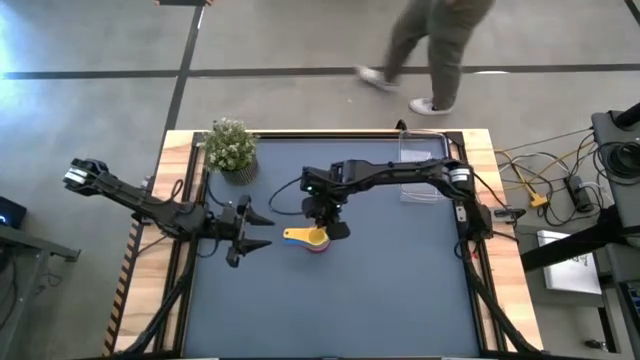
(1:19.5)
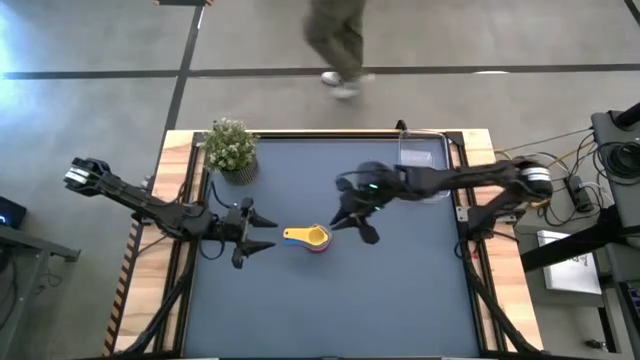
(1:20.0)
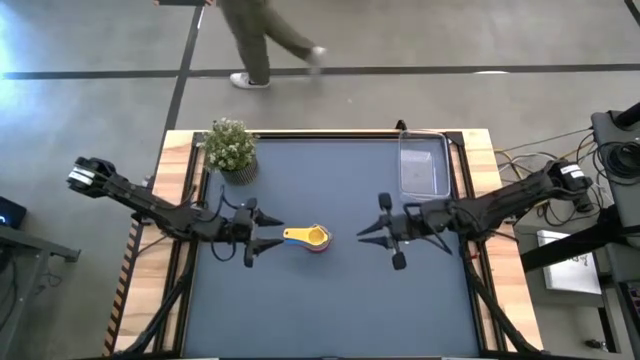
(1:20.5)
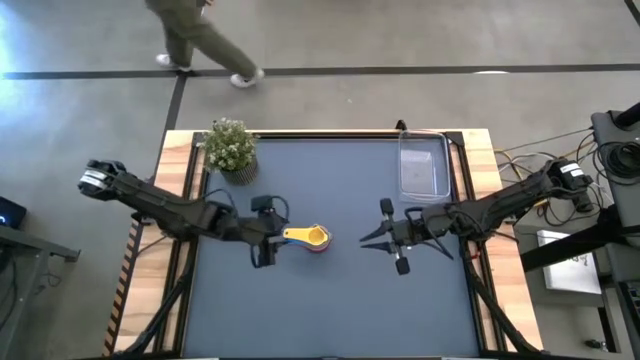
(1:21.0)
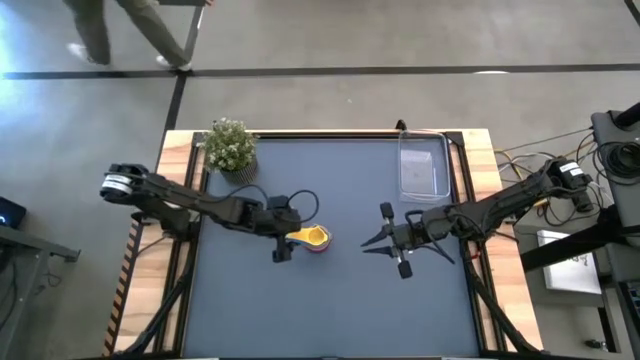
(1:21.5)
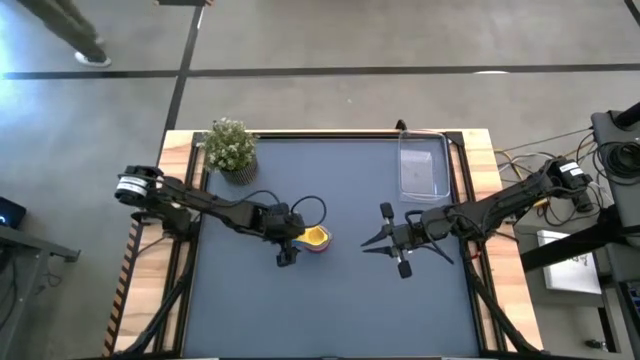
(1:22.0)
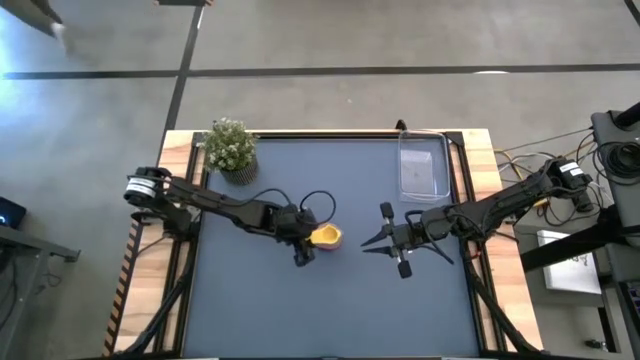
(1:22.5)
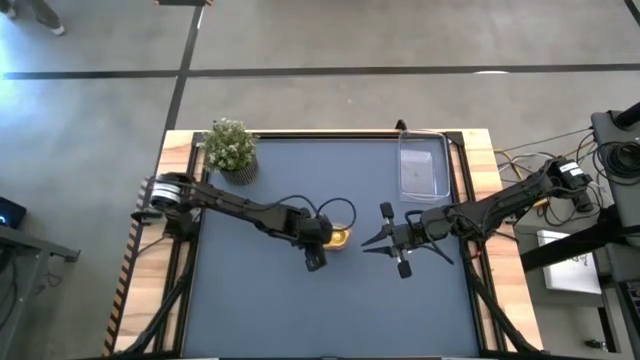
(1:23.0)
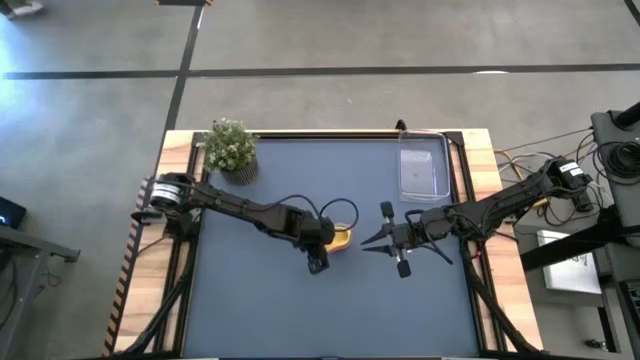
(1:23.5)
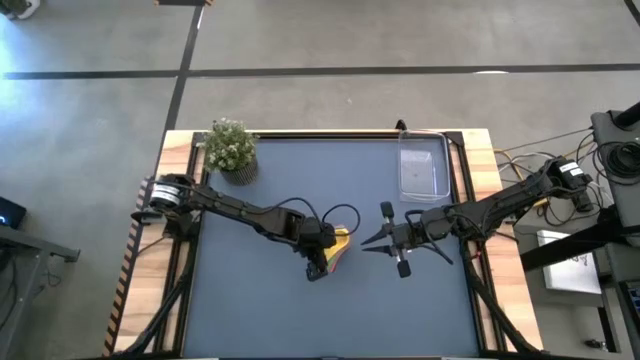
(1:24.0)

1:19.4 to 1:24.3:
Task: Nest measuring cups in basket
Put the stacked measuring cups into the transparent bin

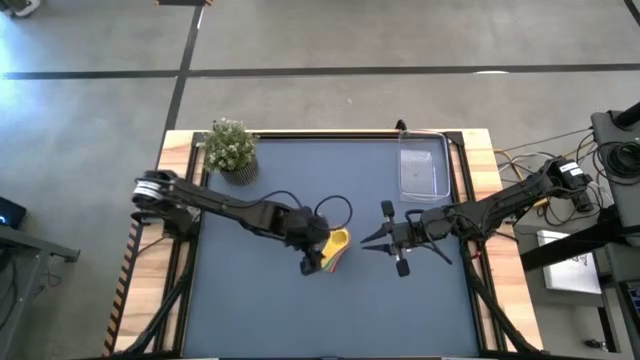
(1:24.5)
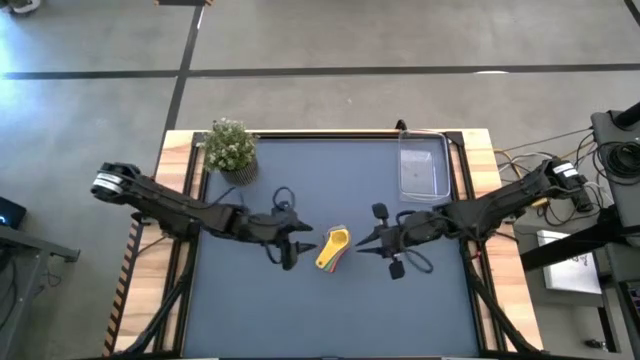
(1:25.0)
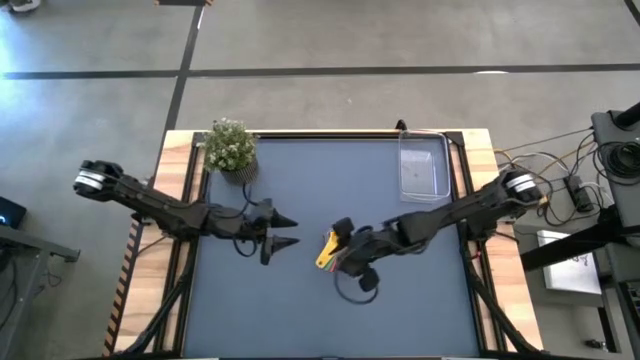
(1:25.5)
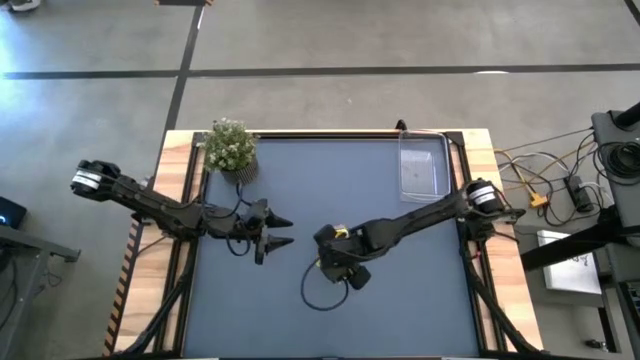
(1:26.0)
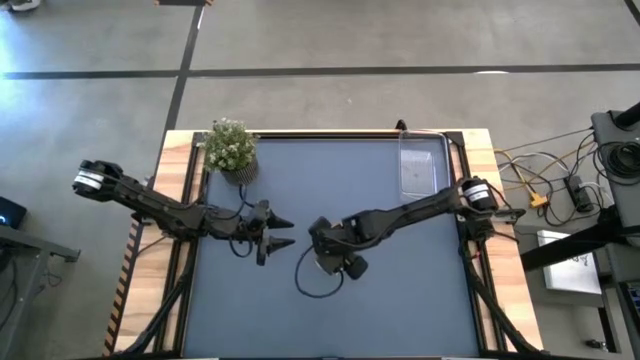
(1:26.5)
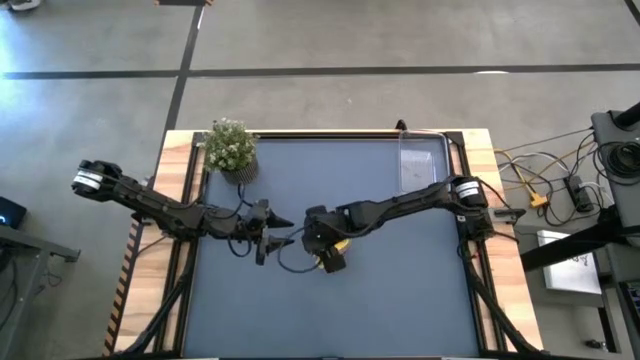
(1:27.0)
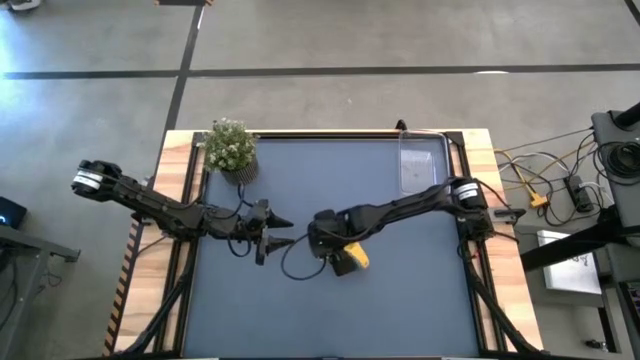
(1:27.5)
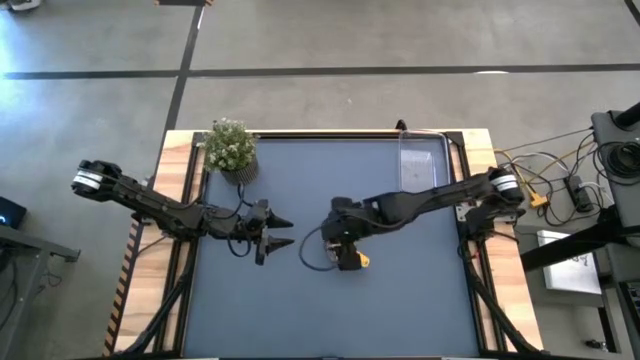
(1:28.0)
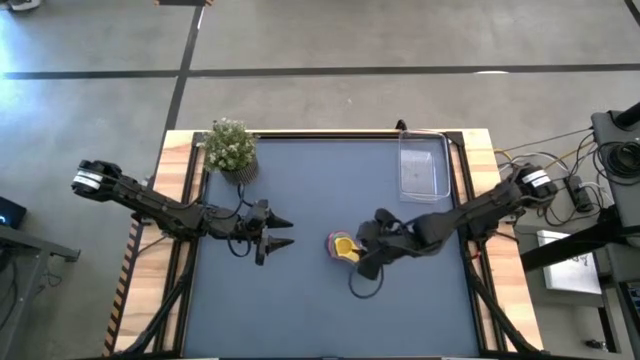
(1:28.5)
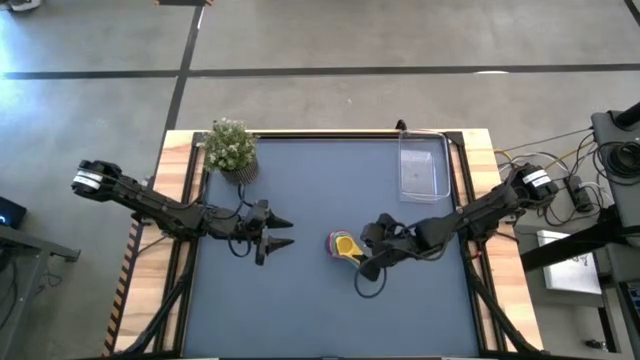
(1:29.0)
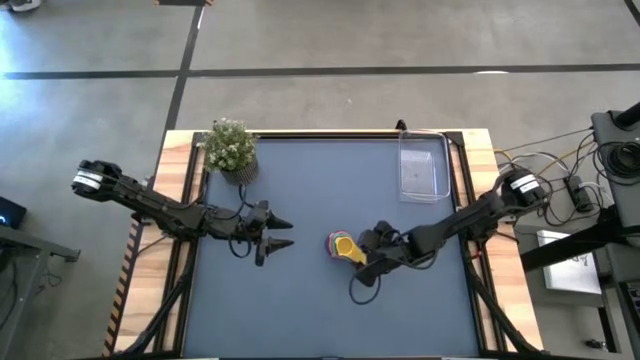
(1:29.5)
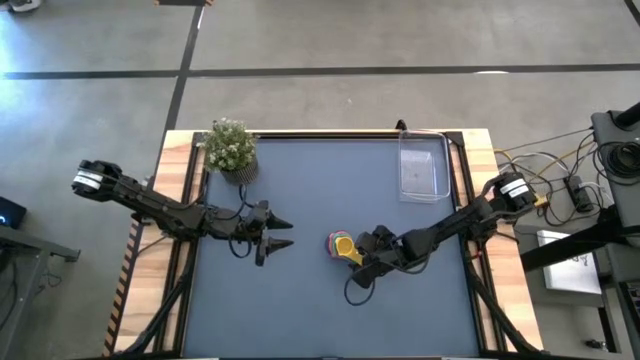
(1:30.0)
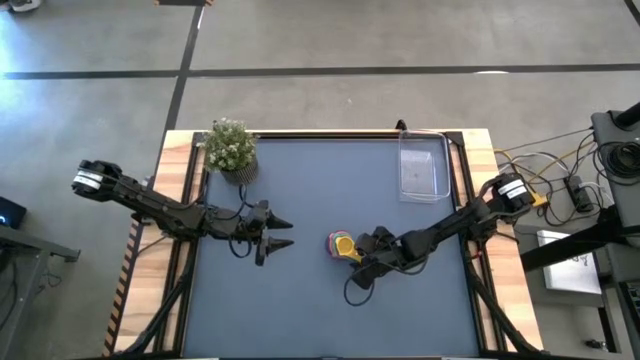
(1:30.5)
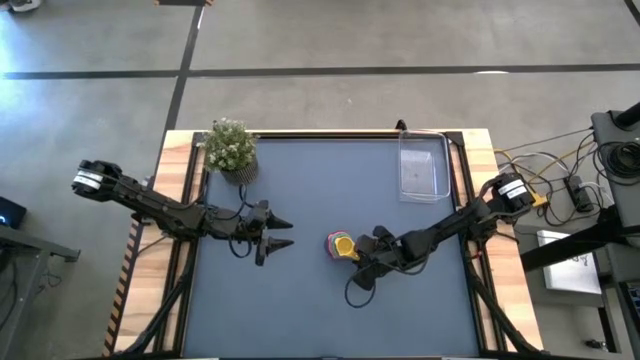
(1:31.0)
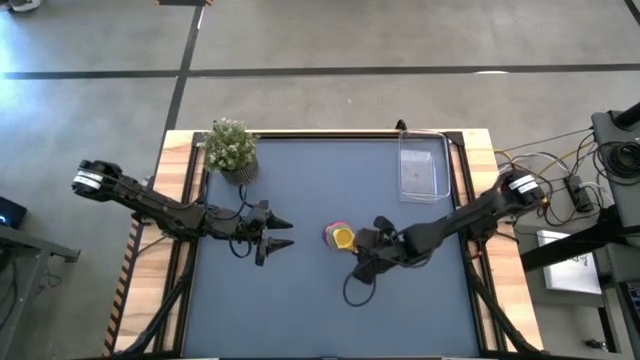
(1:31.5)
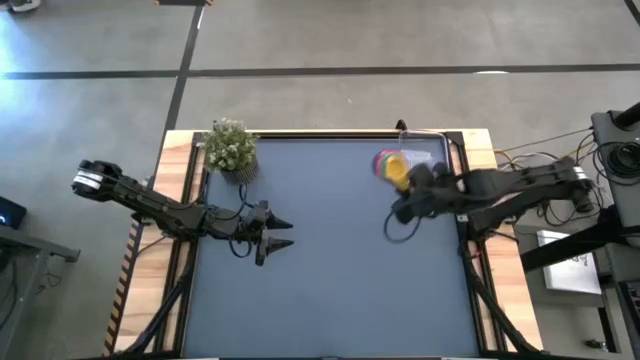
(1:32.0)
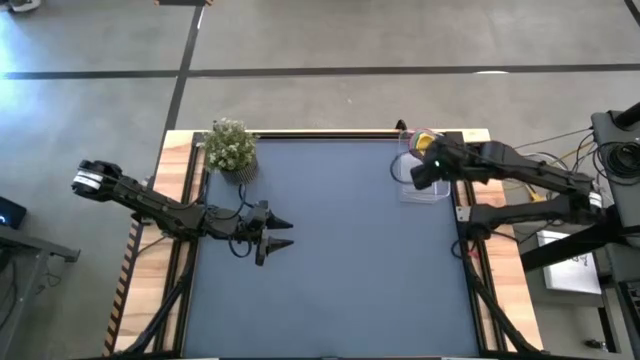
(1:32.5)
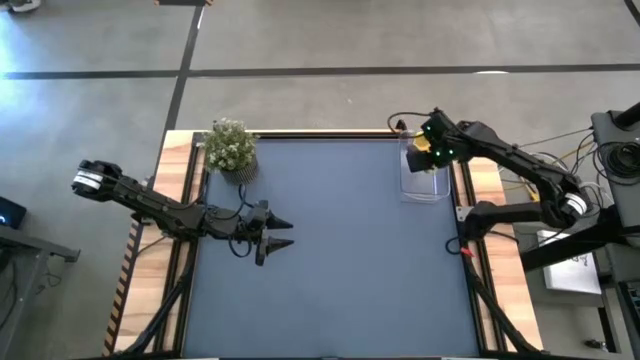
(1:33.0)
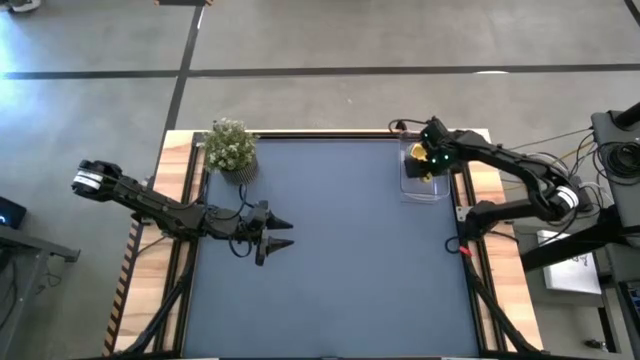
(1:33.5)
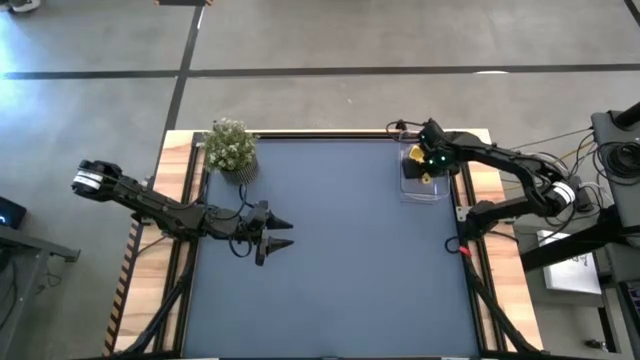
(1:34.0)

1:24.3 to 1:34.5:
Put the stacked measuring cups into the transparent bin

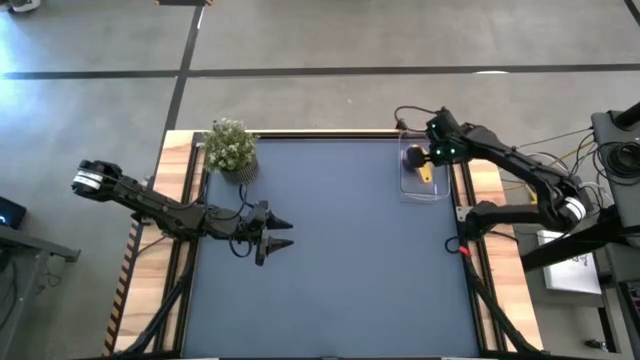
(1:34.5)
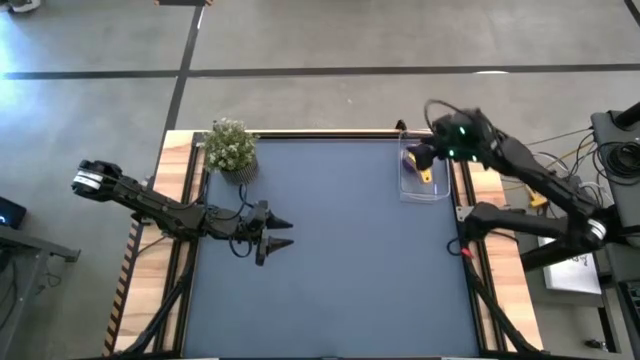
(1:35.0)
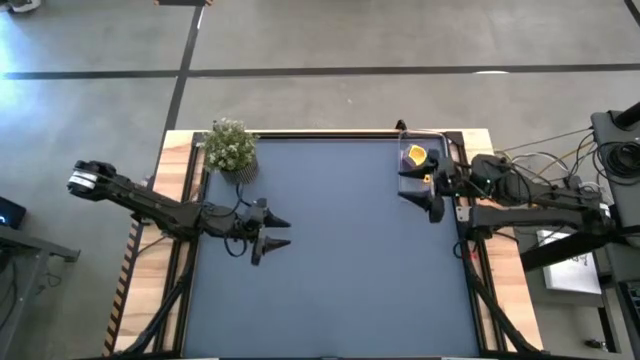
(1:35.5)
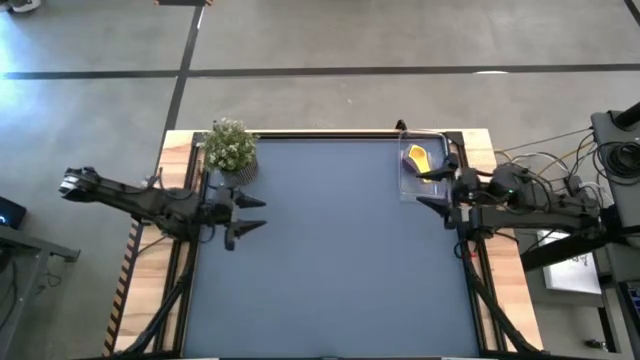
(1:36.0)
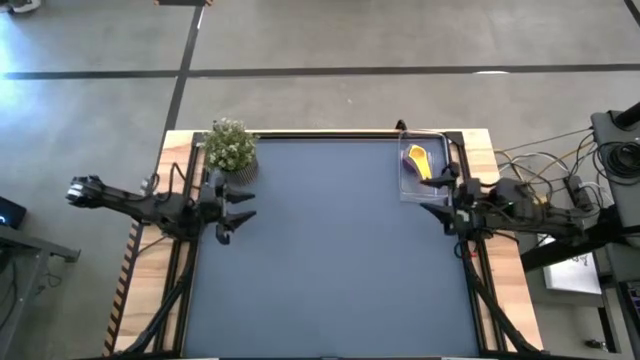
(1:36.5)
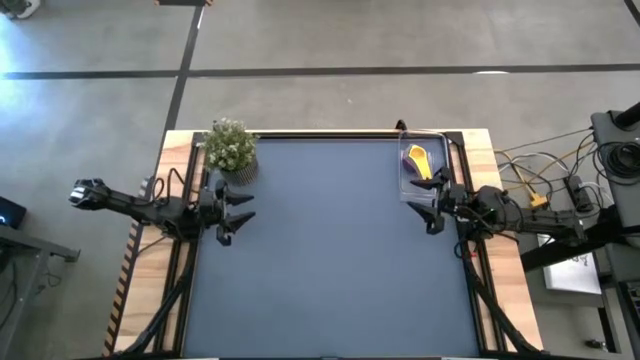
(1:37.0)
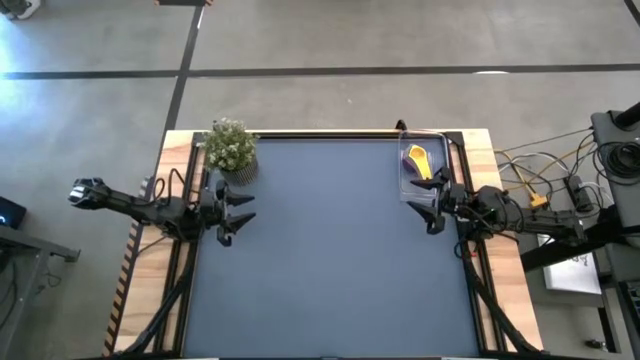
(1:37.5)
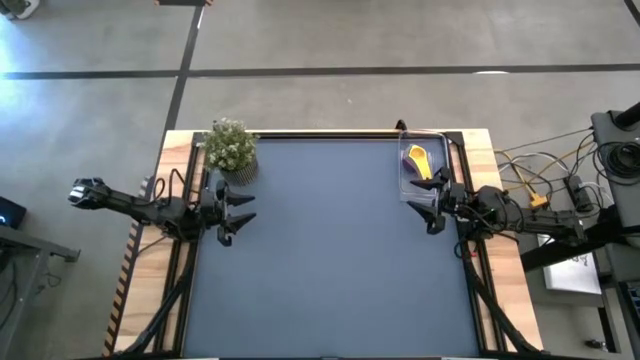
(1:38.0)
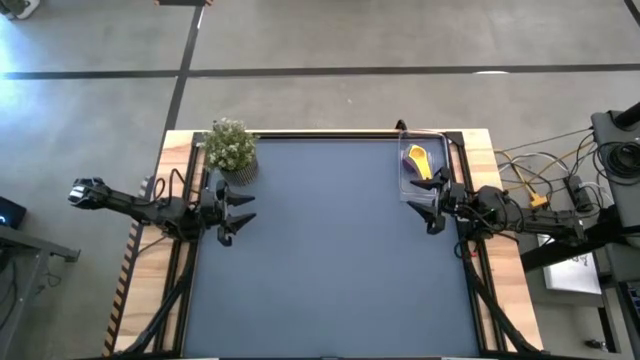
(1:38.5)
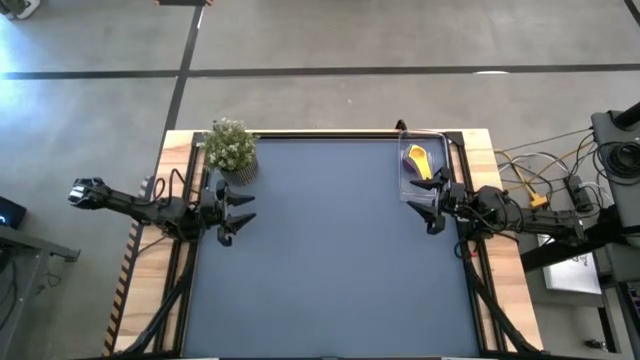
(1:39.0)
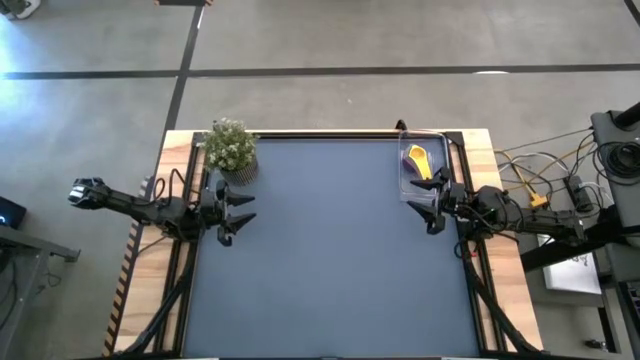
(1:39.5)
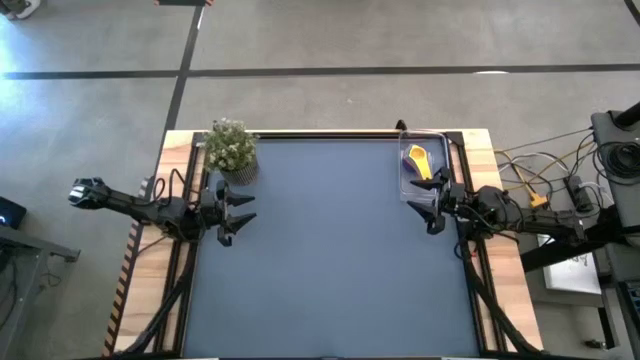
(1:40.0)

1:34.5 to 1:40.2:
Return to Home Position
